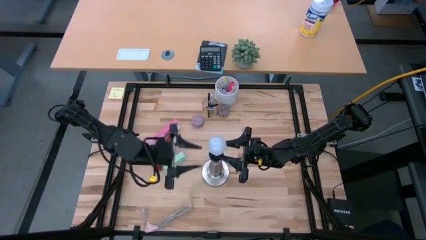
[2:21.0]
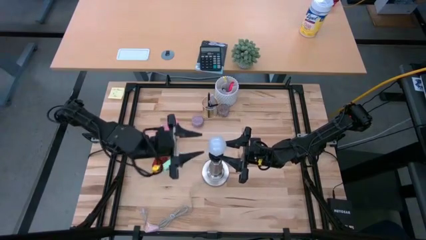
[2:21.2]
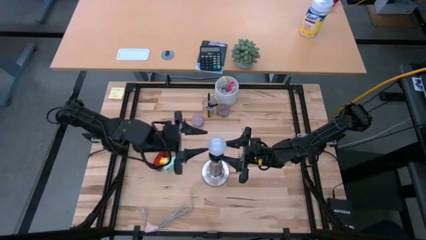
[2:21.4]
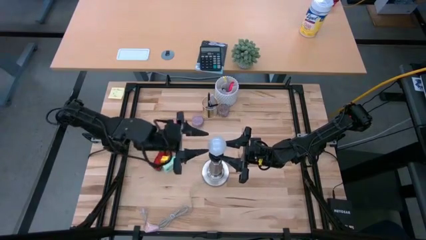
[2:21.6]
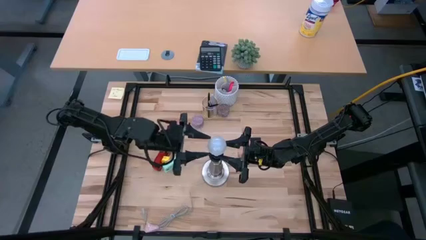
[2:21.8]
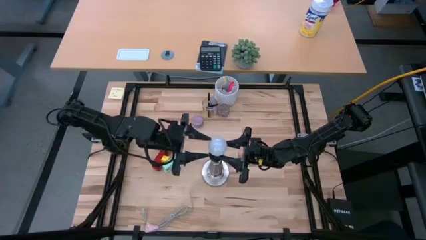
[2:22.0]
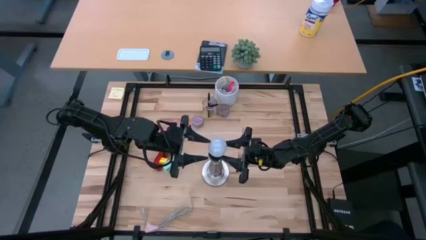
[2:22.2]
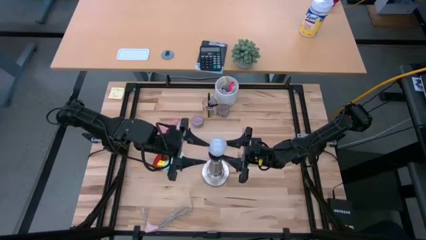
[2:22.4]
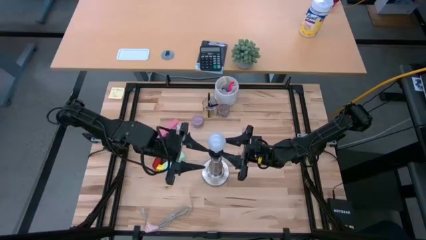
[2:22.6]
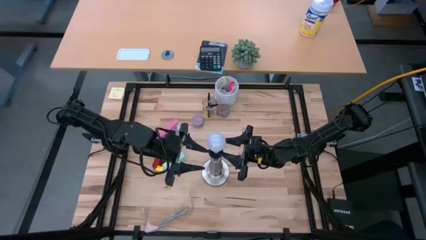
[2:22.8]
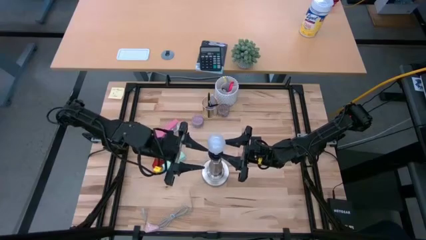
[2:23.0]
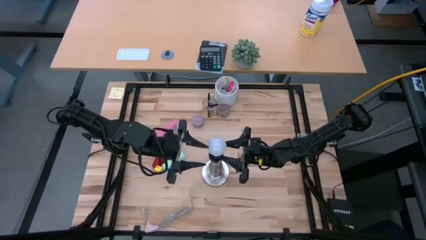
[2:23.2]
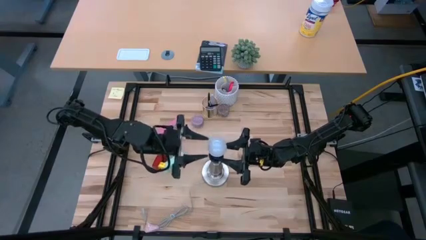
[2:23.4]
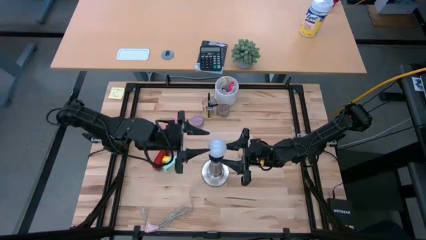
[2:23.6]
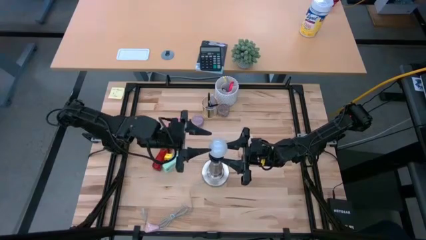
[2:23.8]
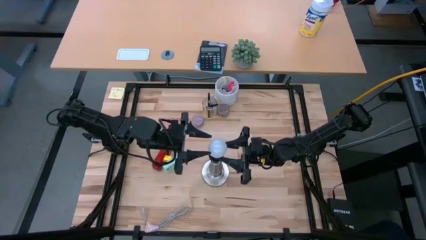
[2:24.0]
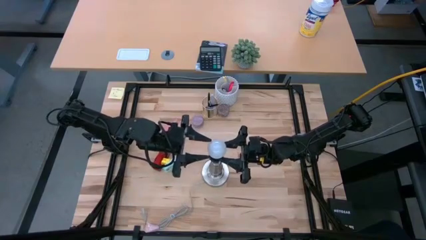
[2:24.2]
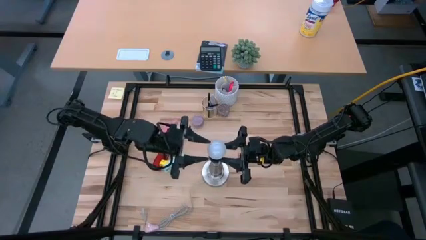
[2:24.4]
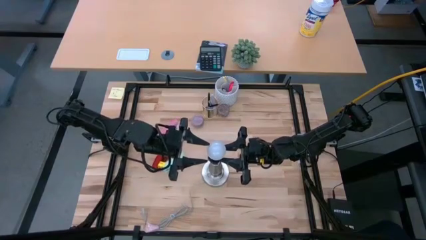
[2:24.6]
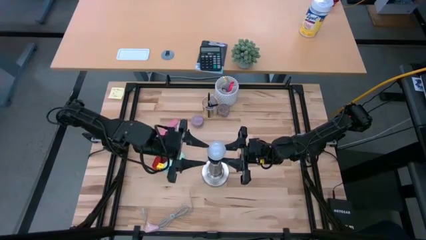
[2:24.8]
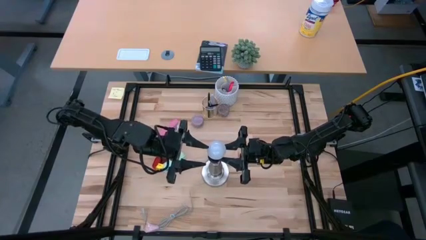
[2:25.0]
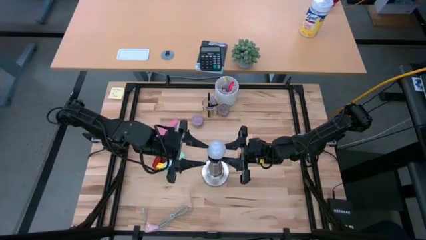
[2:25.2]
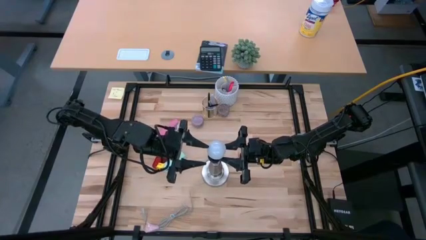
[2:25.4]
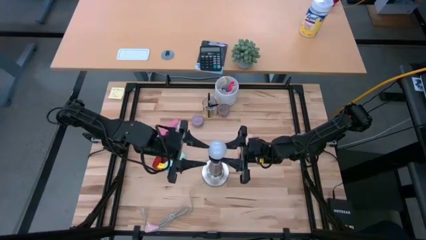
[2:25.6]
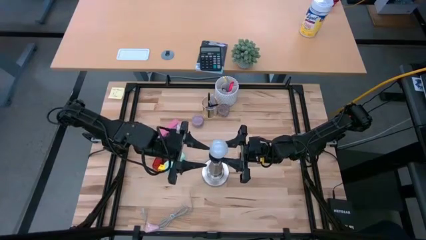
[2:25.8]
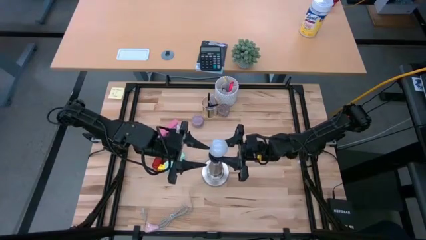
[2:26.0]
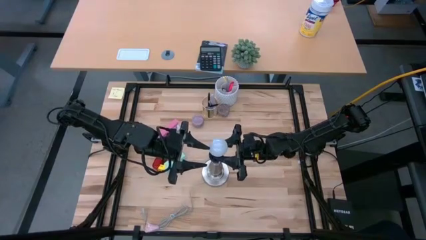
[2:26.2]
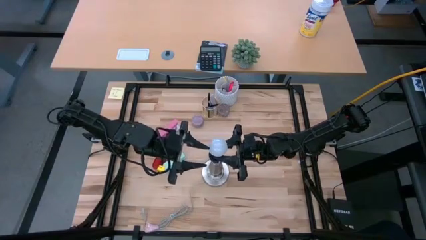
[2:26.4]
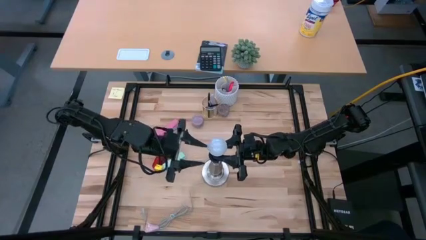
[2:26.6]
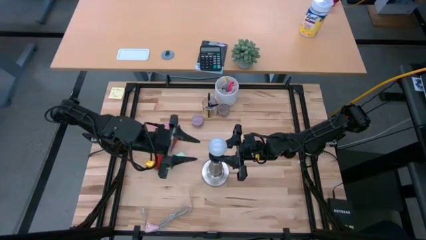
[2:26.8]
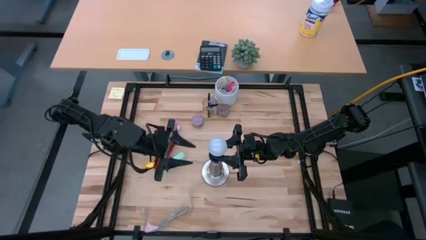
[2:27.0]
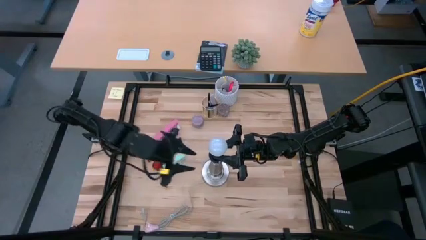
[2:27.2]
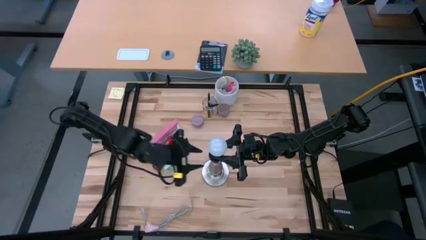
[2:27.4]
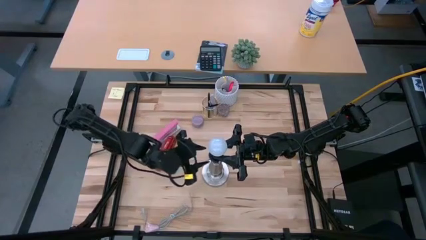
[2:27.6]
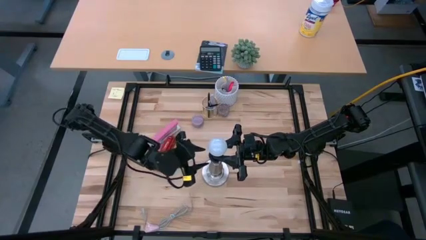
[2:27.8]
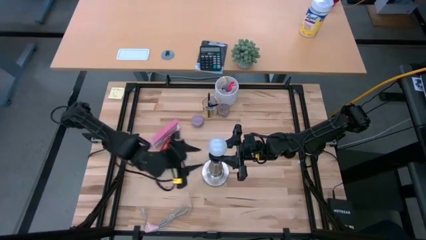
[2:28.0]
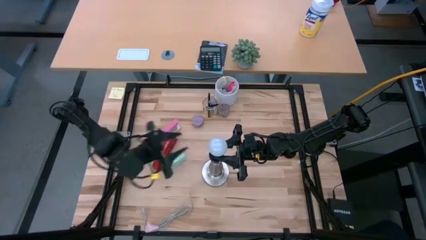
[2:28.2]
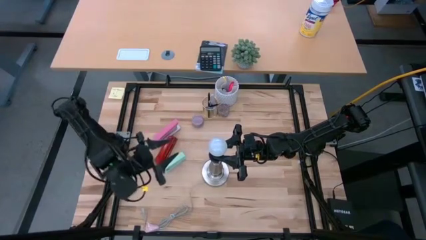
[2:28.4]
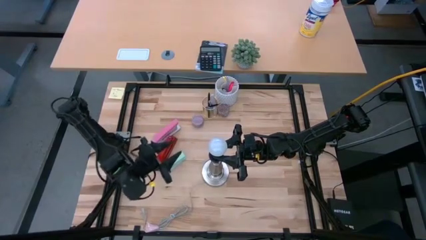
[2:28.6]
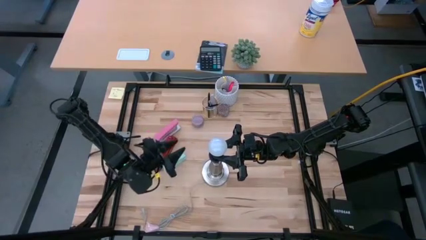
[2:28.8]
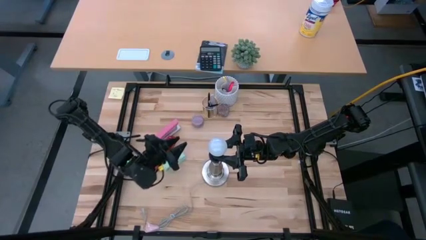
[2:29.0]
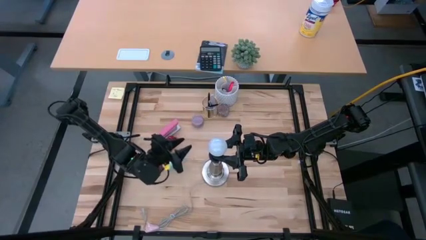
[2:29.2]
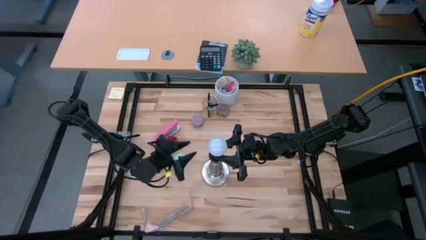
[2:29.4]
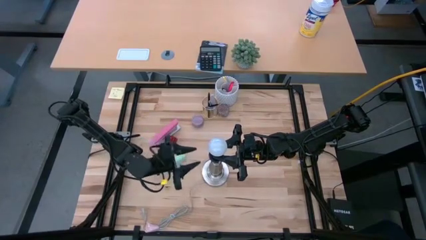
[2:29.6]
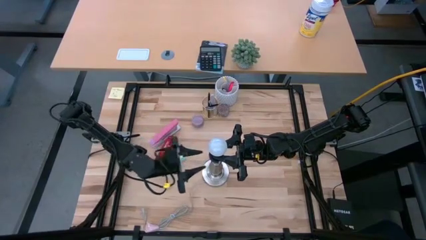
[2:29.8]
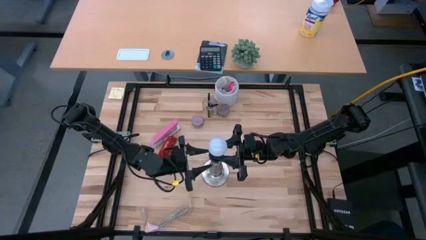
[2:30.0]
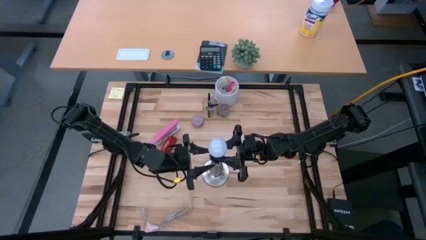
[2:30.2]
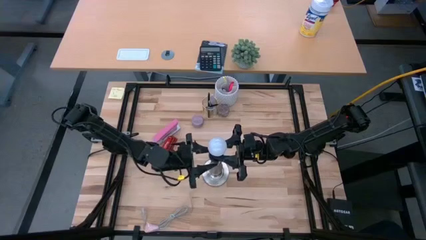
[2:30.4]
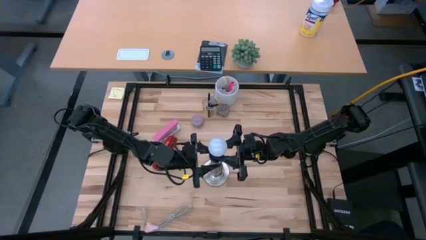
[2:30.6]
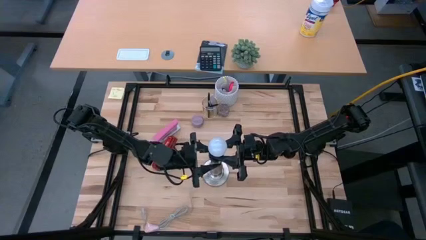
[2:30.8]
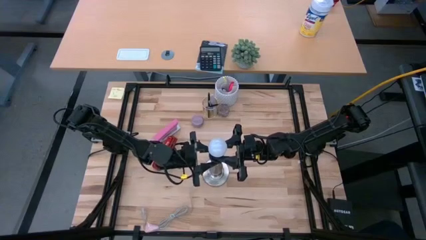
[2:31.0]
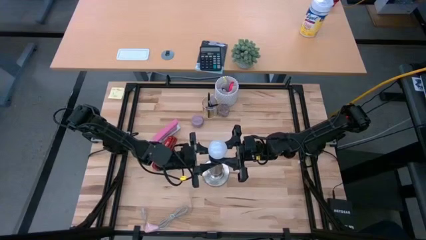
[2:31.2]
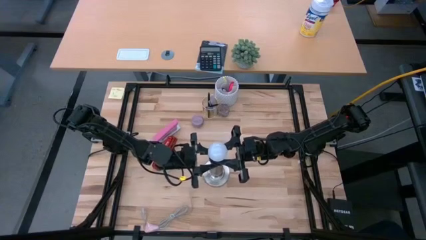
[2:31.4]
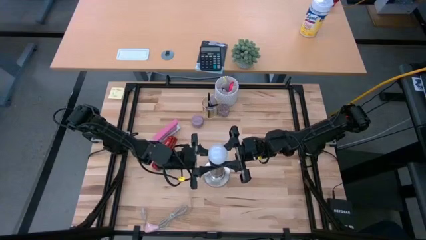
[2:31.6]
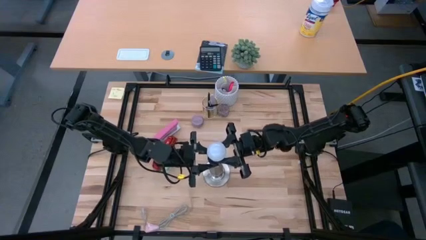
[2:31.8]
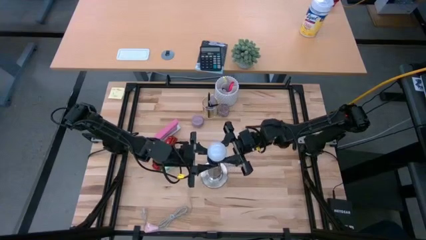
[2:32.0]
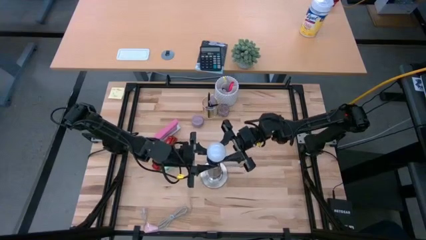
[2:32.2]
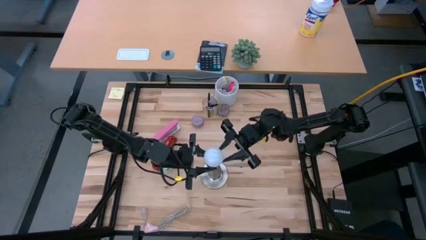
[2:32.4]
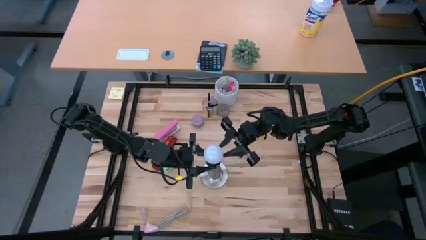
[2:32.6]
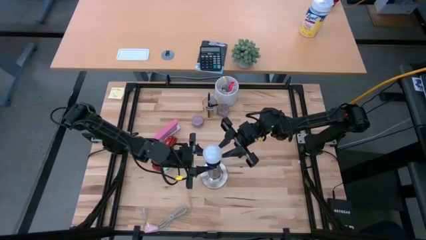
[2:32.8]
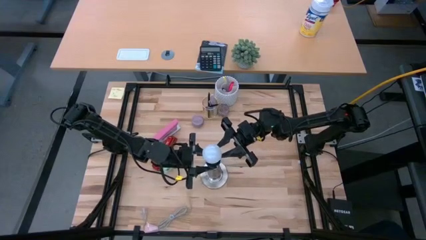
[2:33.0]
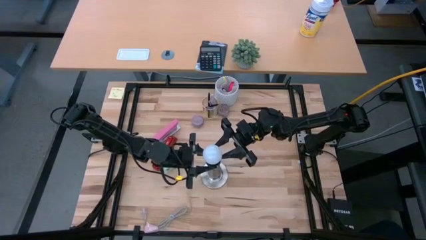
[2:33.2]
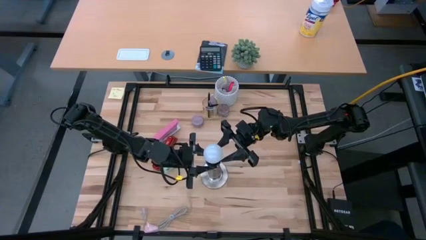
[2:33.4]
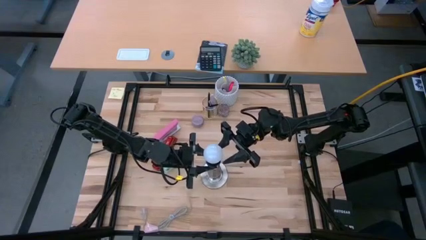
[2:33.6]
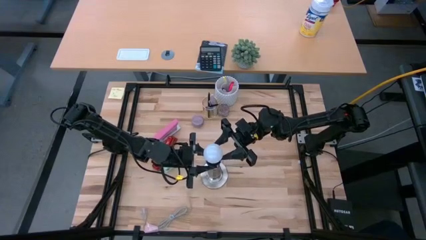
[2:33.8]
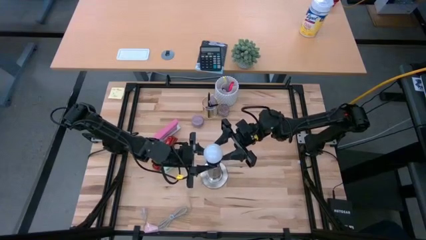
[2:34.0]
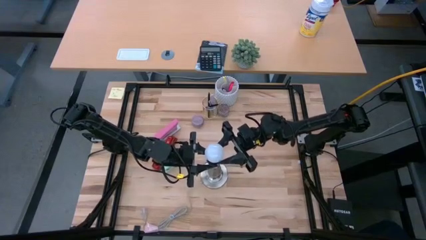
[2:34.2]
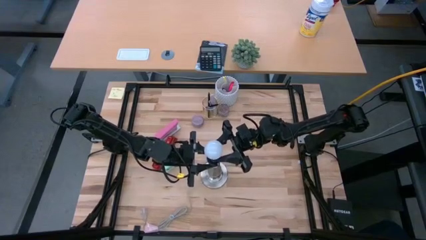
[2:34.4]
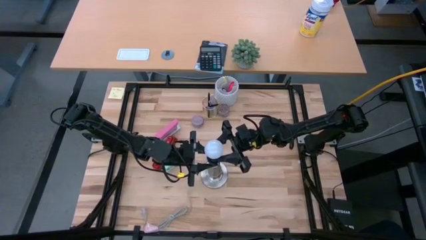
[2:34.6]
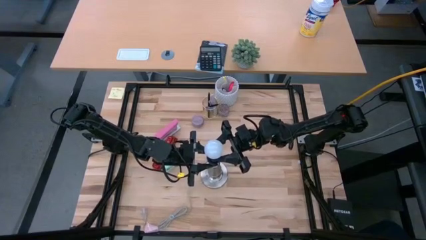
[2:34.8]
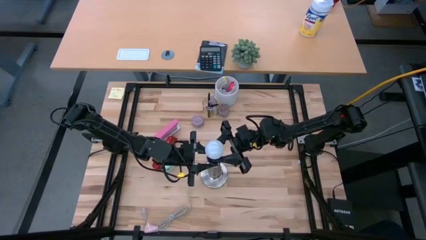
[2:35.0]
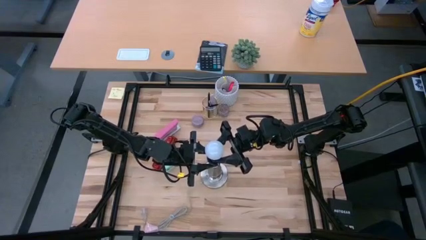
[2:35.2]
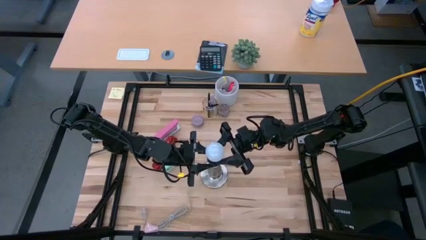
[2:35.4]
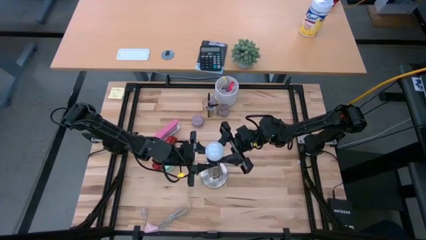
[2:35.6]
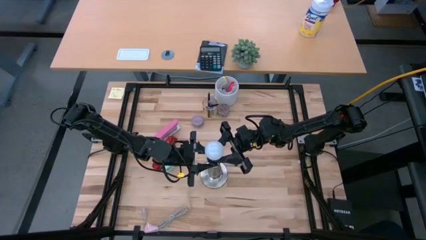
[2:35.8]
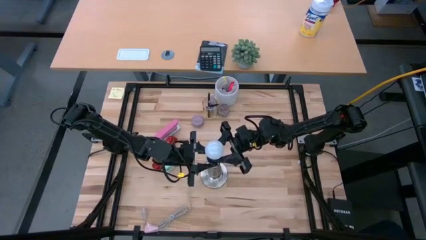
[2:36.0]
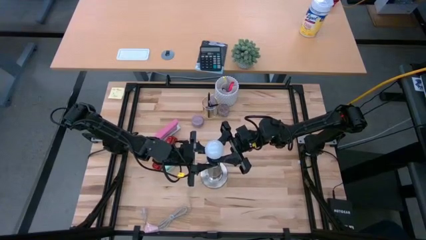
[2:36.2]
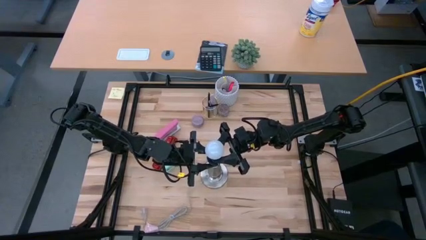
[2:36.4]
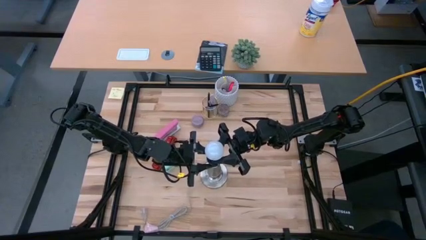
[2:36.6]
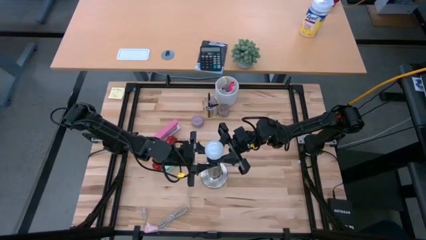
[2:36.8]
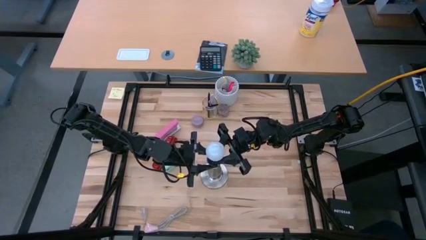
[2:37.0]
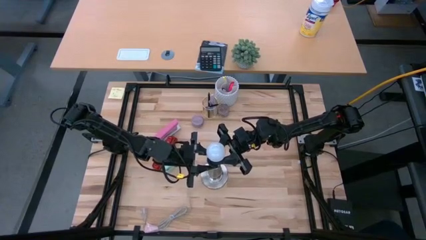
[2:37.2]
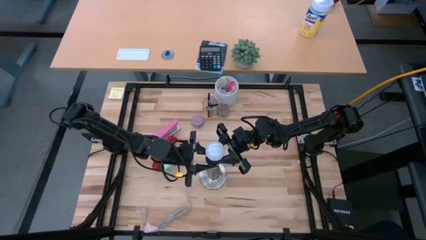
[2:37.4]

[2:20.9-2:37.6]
Task: Screw lightbulb
Remove the lightbulb from the lamp

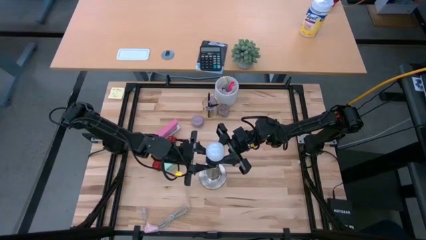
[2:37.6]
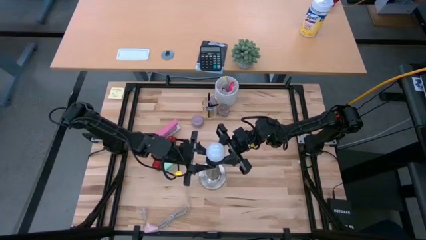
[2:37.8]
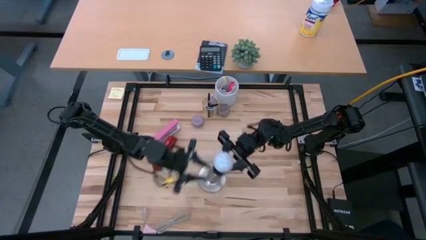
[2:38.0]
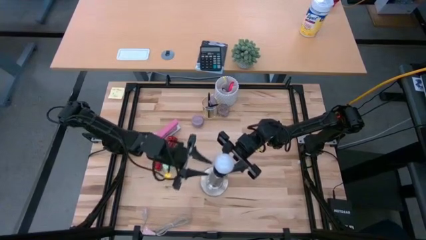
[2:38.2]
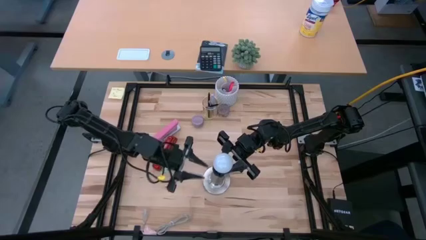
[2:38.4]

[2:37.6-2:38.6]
Remove the lightbulb from the lamp
